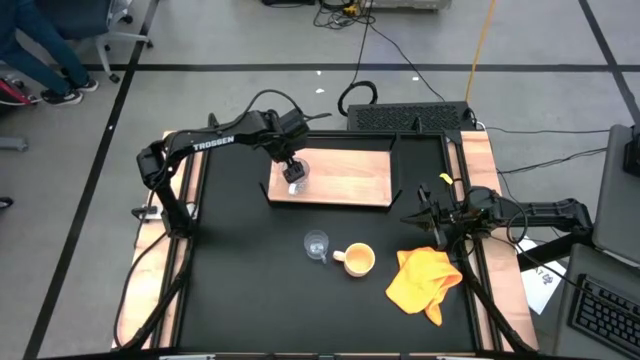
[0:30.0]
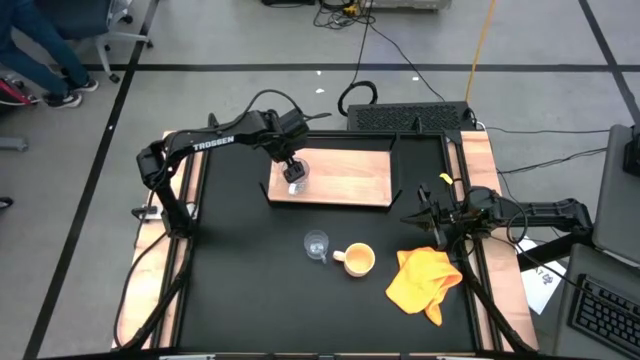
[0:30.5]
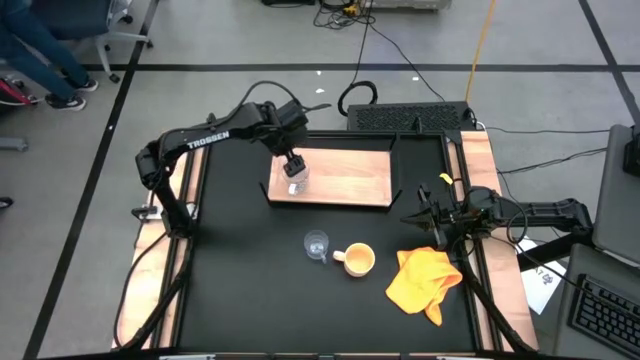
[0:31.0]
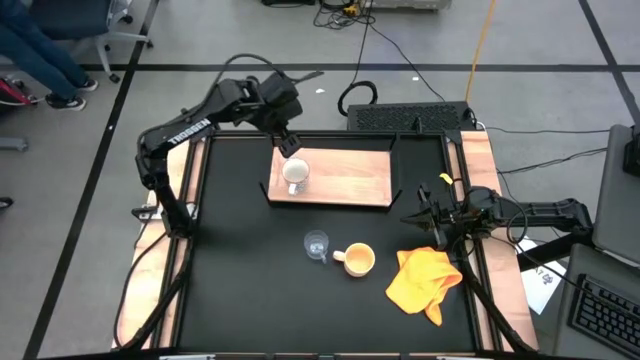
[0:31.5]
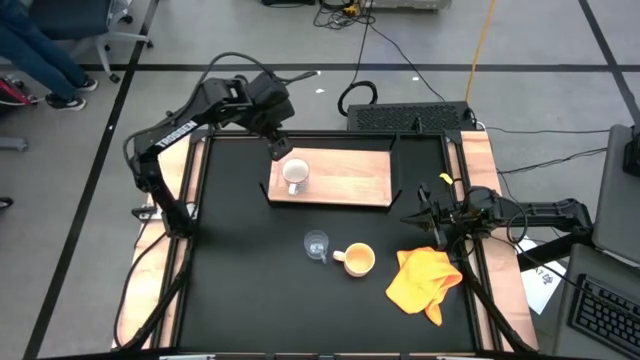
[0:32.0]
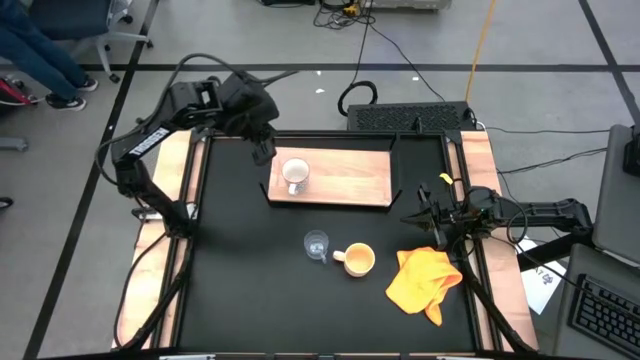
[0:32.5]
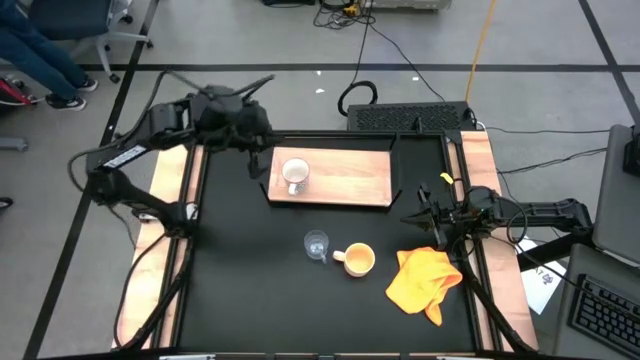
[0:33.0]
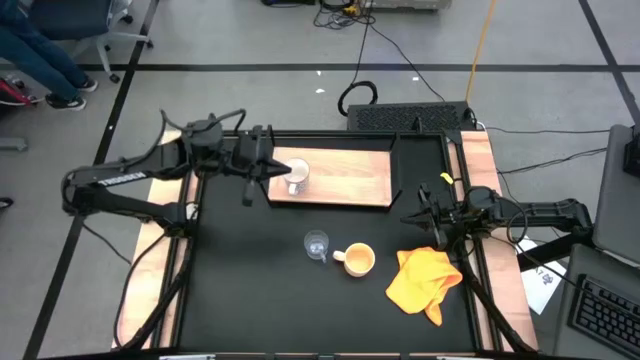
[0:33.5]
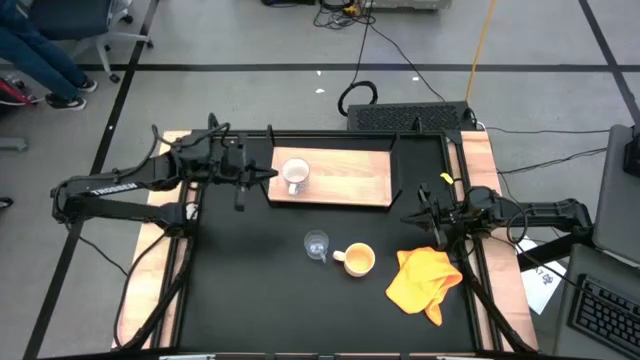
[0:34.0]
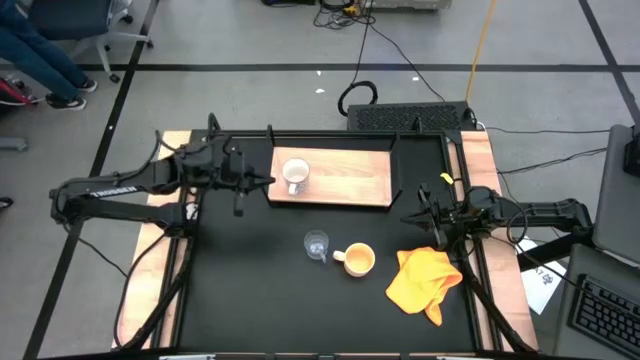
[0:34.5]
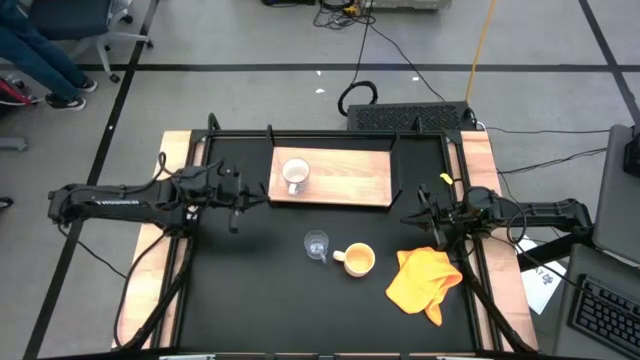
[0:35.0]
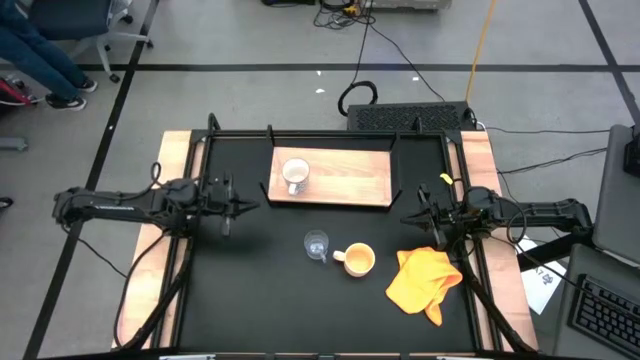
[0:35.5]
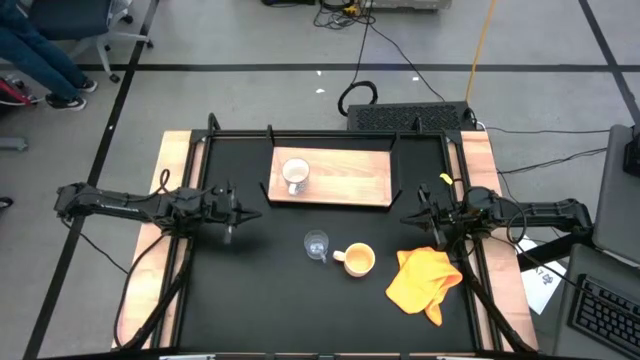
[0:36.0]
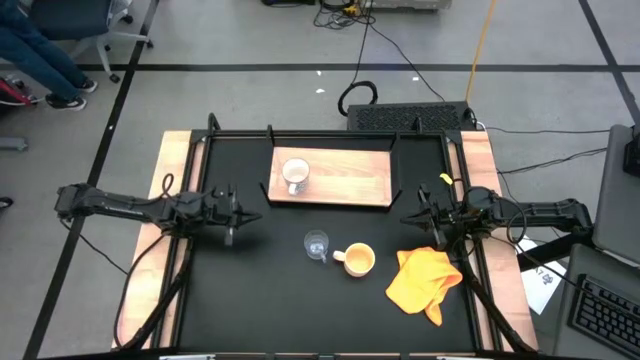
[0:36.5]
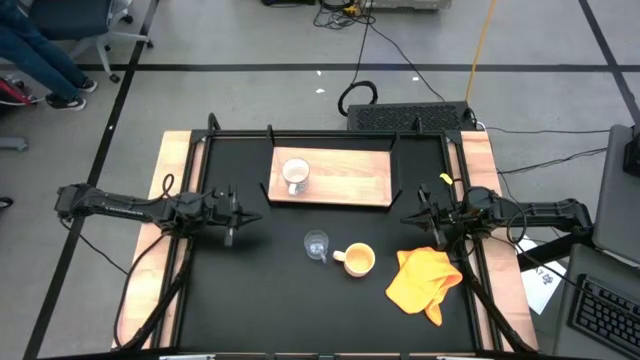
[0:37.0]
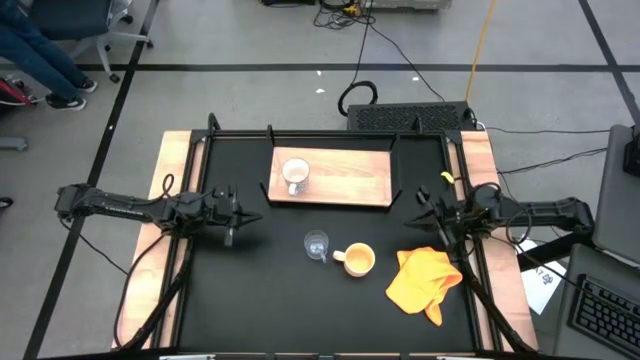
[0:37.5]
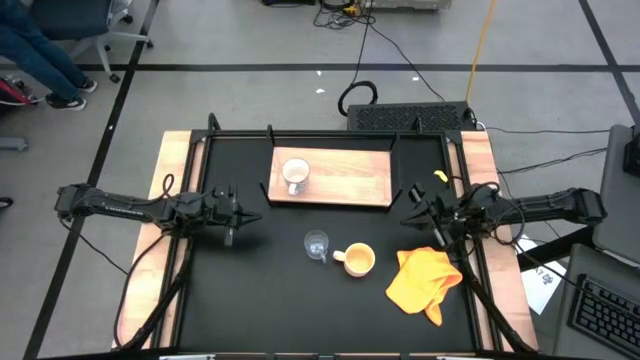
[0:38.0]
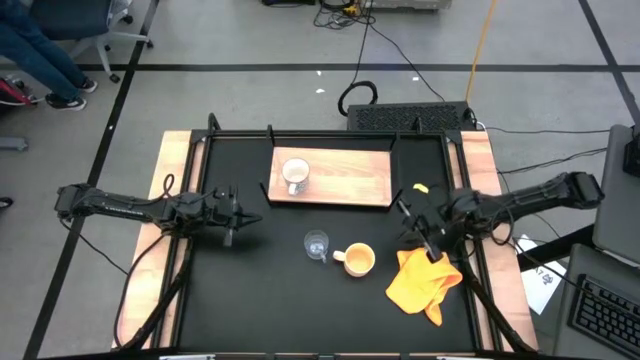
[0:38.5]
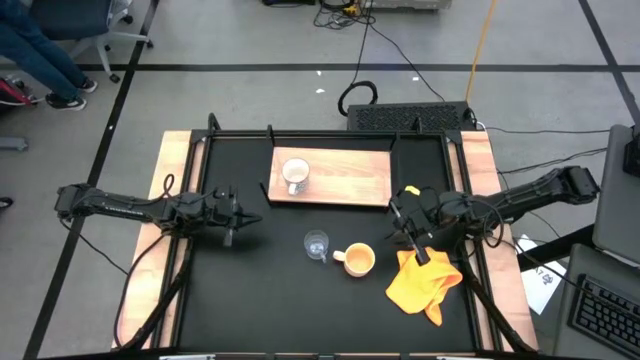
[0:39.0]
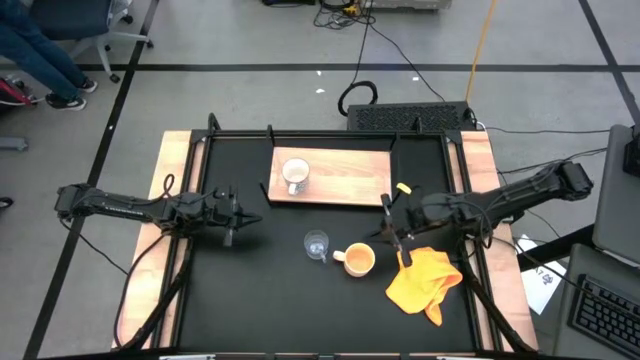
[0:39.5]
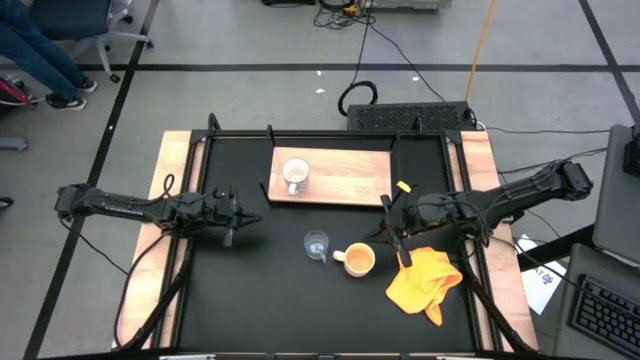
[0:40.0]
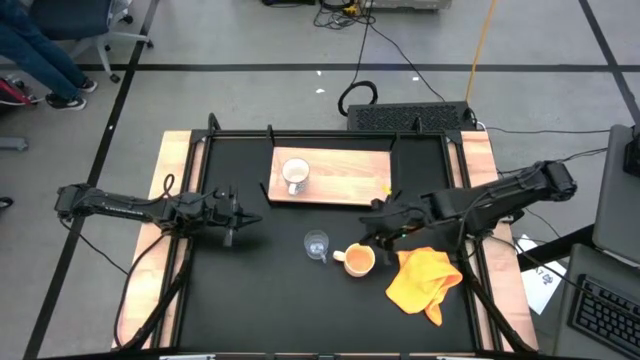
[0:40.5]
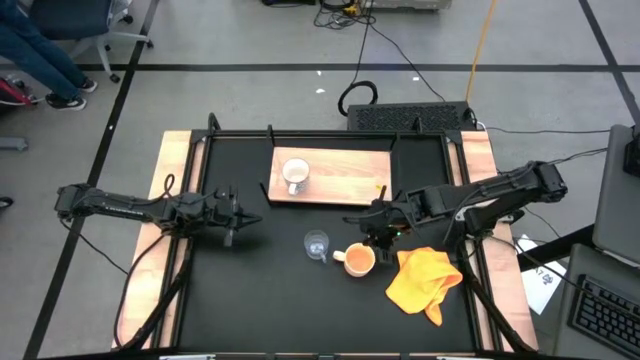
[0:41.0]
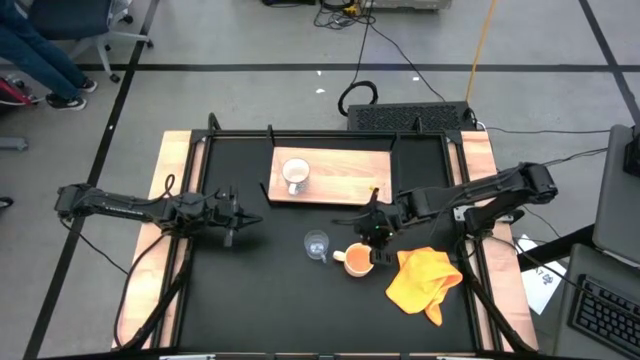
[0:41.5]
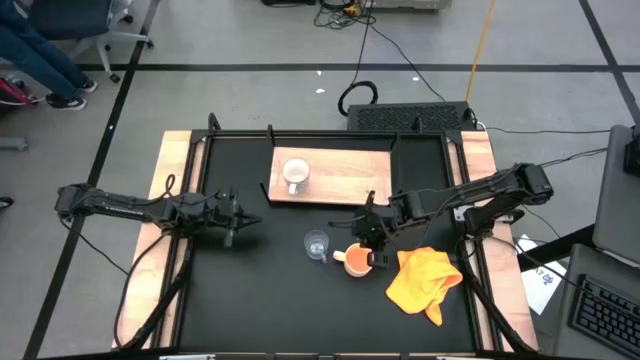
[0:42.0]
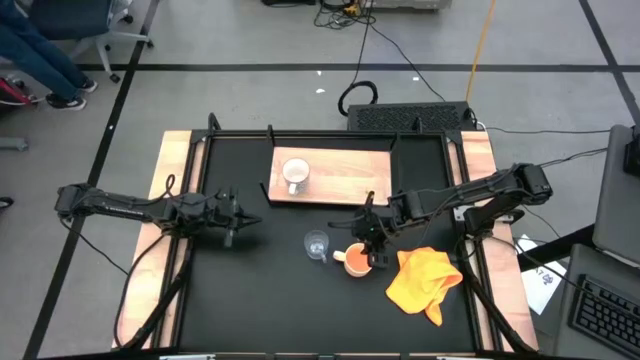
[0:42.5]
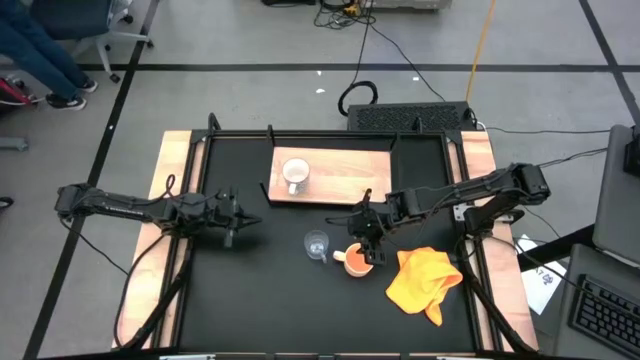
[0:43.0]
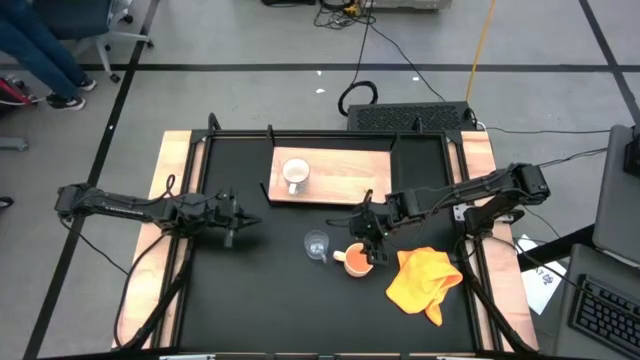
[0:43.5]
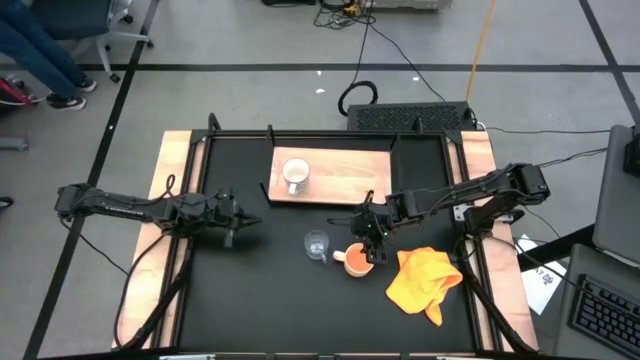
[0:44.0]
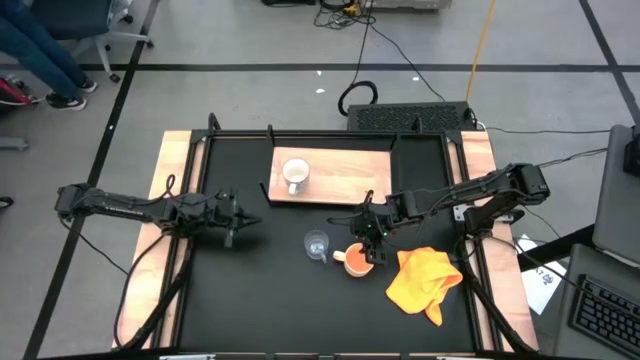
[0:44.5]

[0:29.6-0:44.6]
Task: Stack small to large cups/mugs on shelf
Put the orange mug on the shelf
